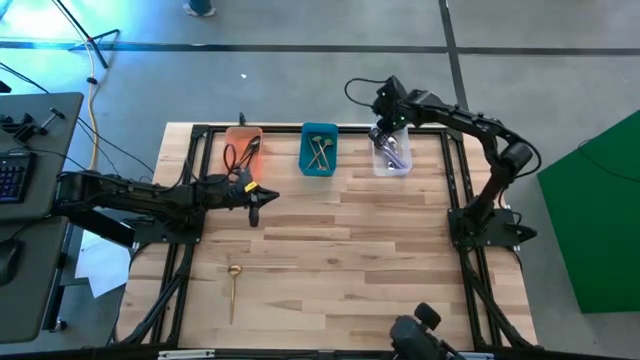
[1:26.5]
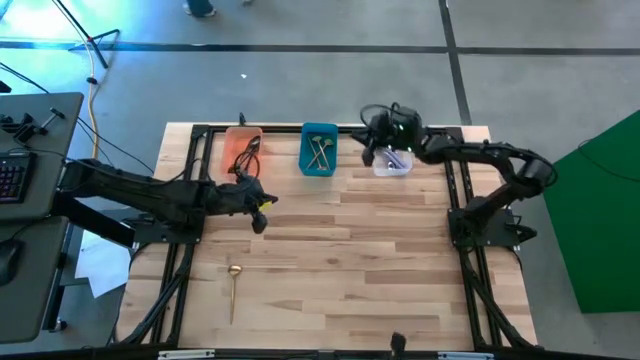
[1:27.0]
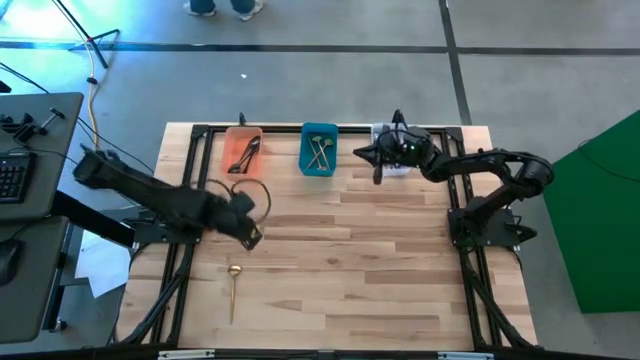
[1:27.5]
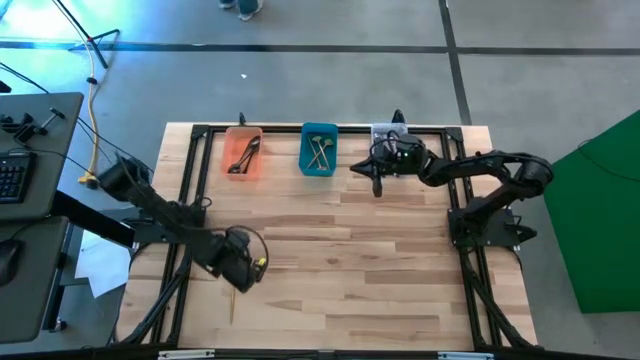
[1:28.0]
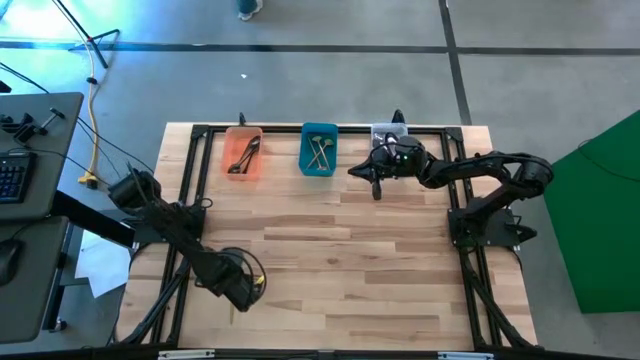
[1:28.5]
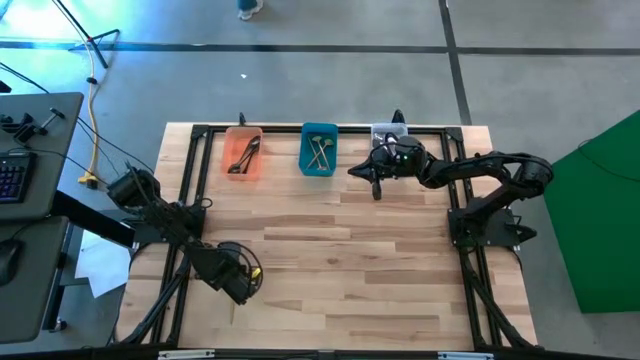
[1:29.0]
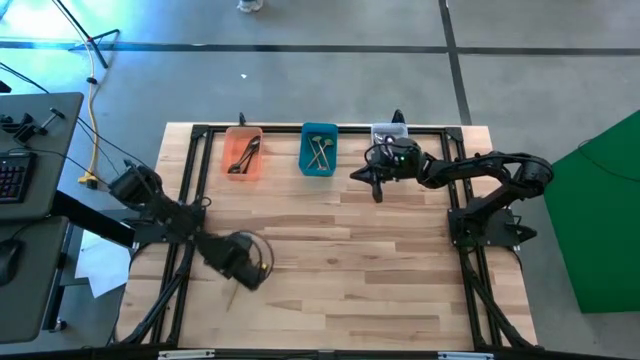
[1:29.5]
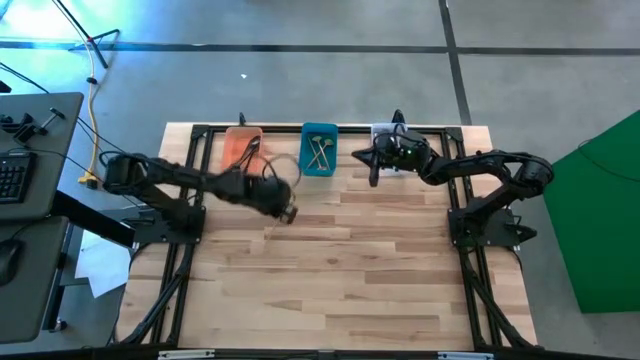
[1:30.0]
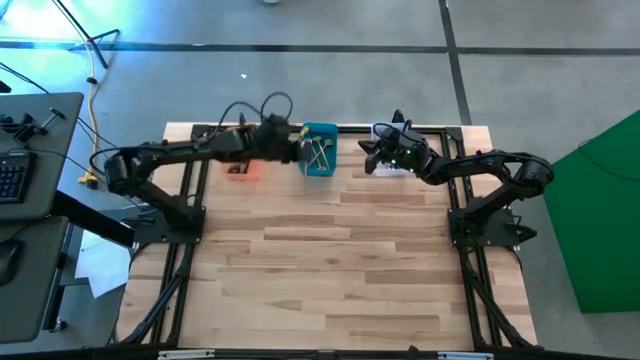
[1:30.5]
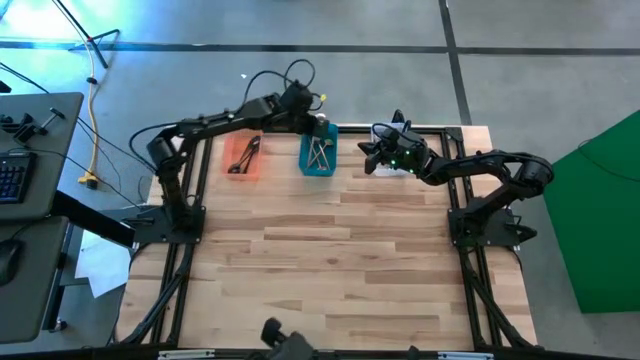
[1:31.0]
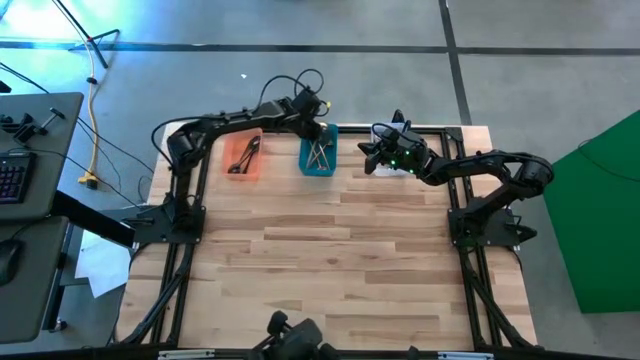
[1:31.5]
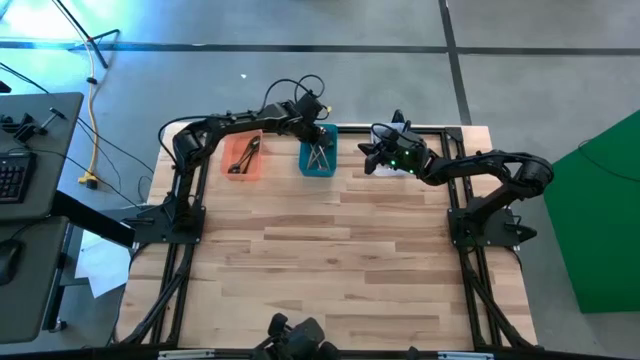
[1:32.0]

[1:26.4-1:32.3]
Task: Sort silverware by color (type)
Put the gold spoon into the blue bin

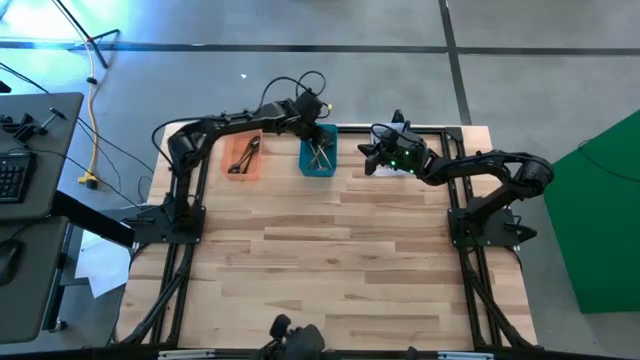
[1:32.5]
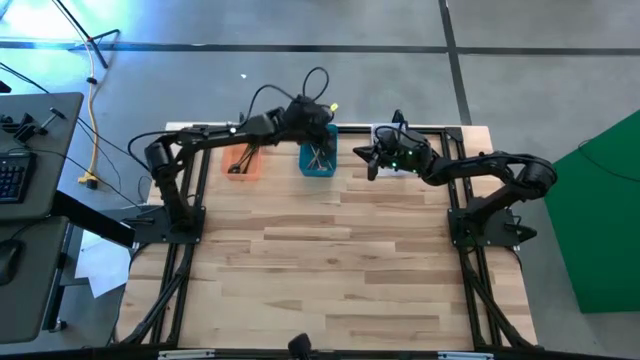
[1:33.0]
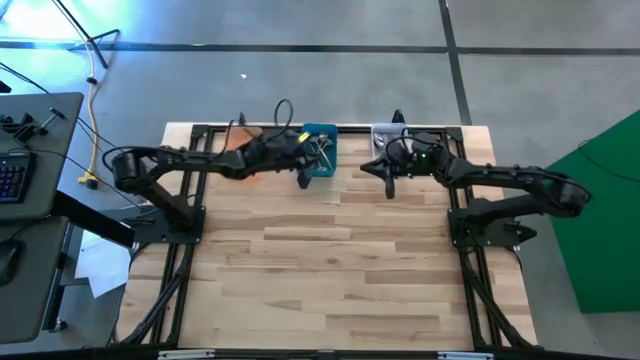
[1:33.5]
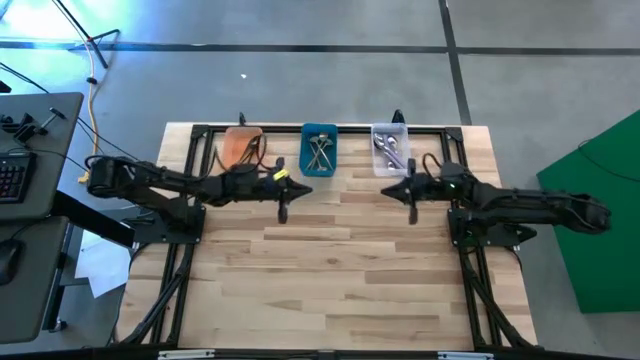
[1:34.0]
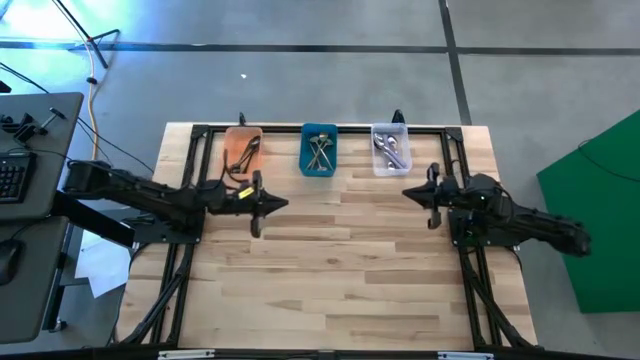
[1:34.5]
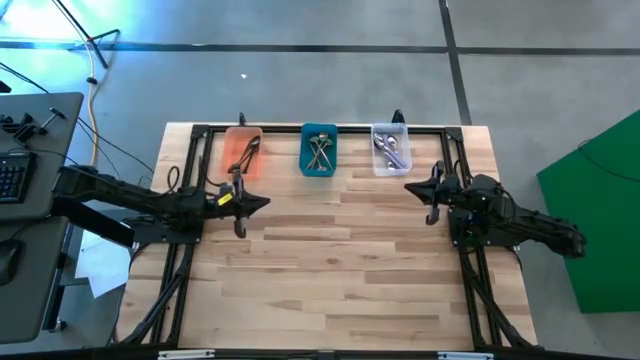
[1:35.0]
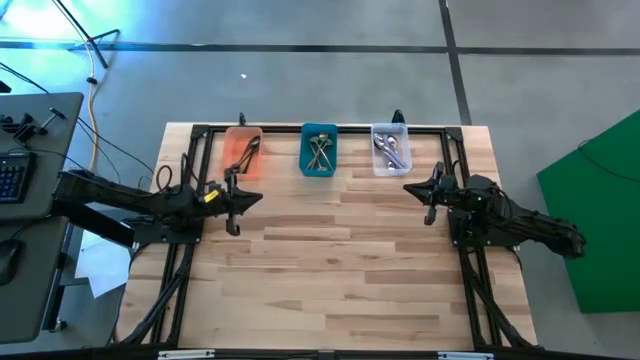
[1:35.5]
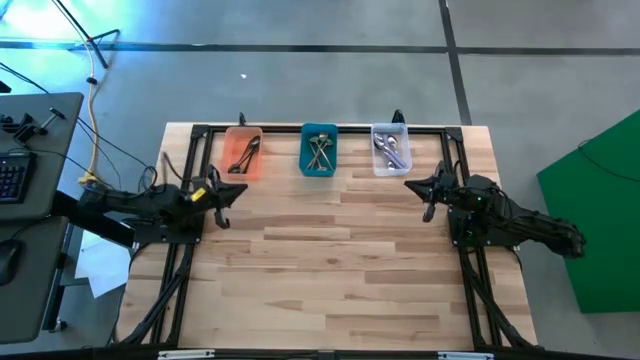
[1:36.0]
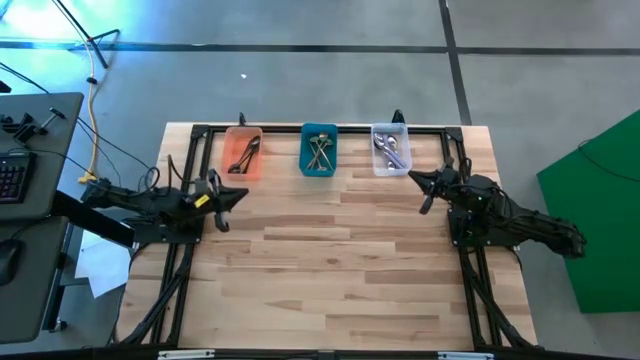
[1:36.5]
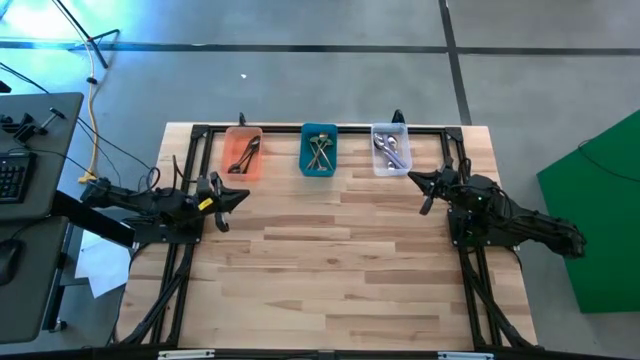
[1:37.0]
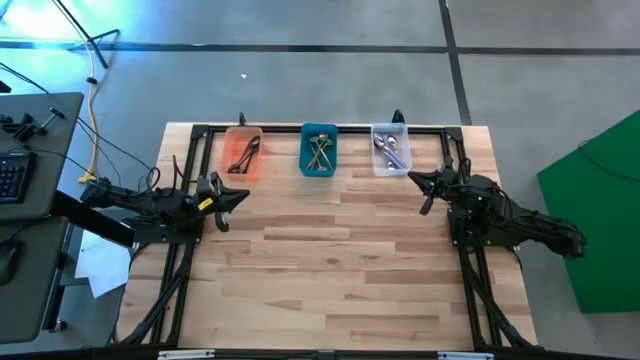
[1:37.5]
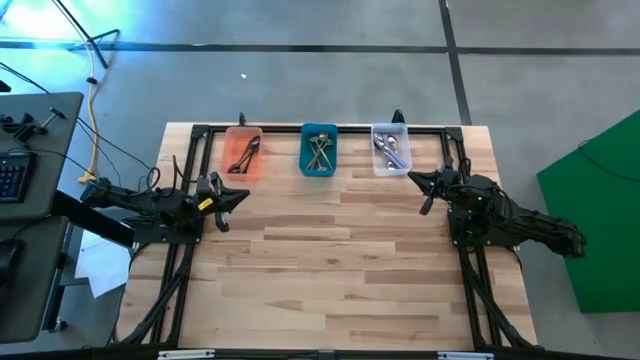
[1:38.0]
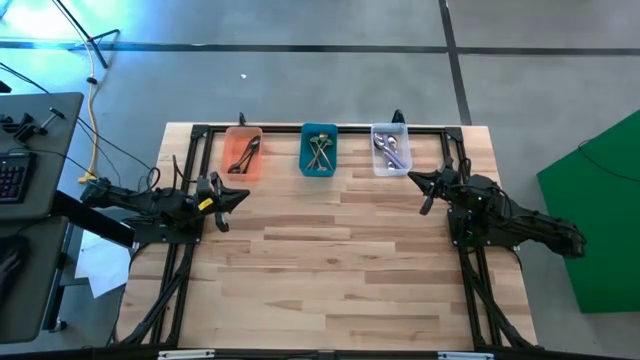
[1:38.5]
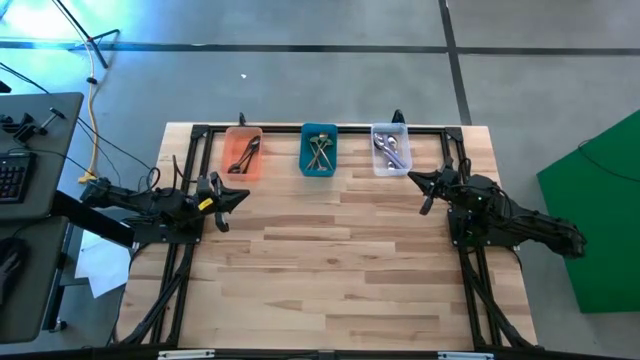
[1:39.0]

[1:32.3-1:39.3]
Return to Home Position

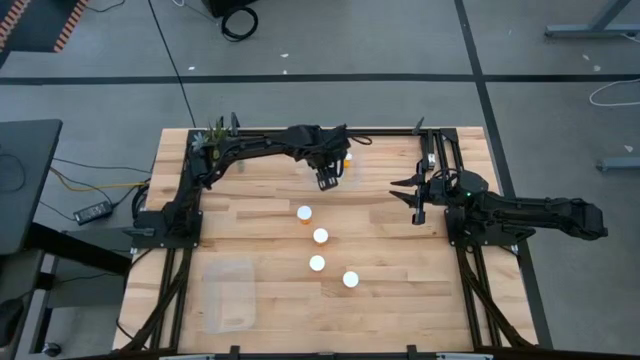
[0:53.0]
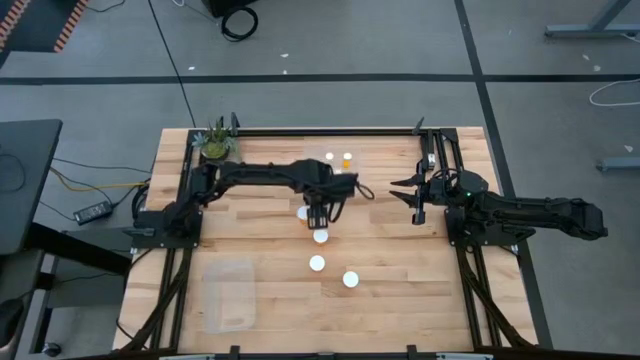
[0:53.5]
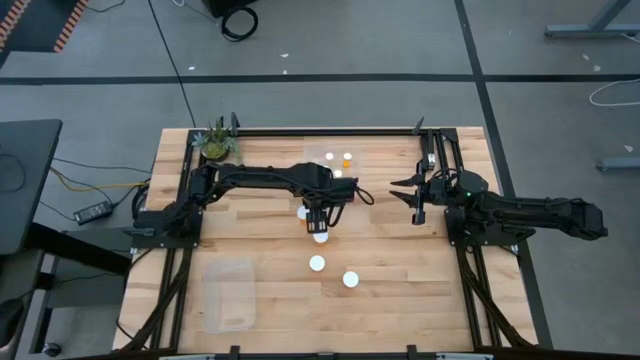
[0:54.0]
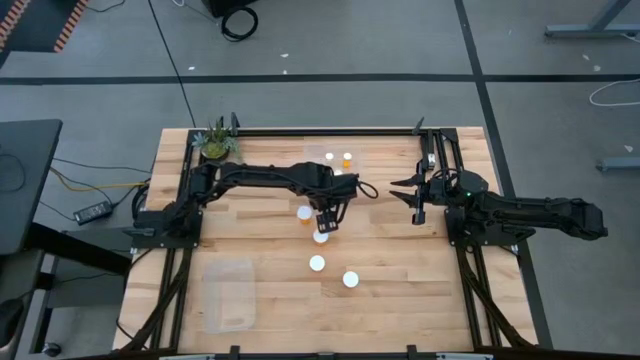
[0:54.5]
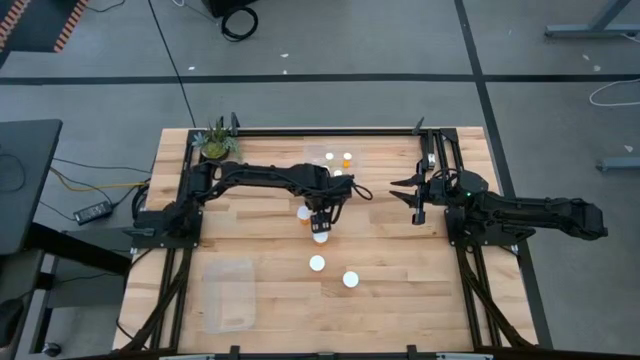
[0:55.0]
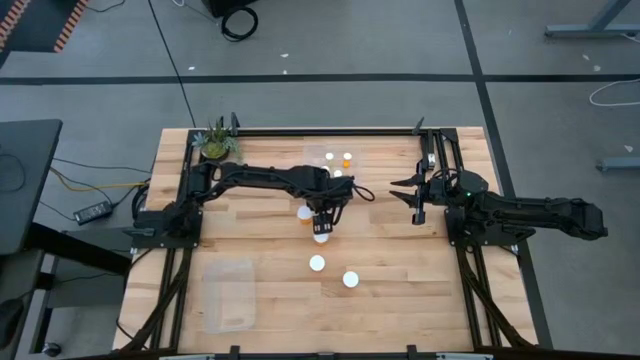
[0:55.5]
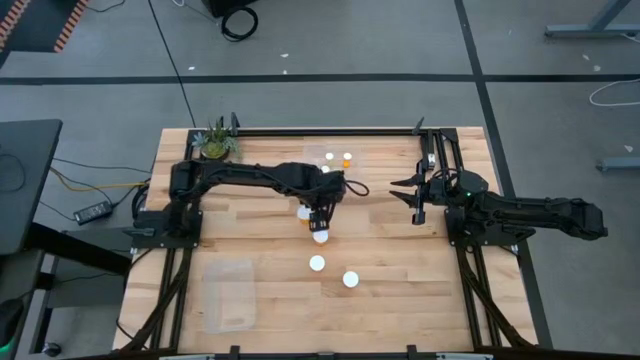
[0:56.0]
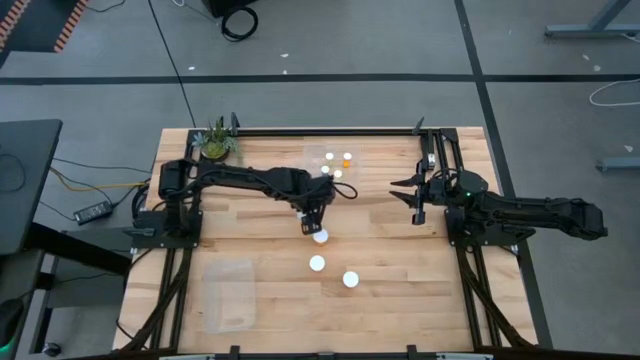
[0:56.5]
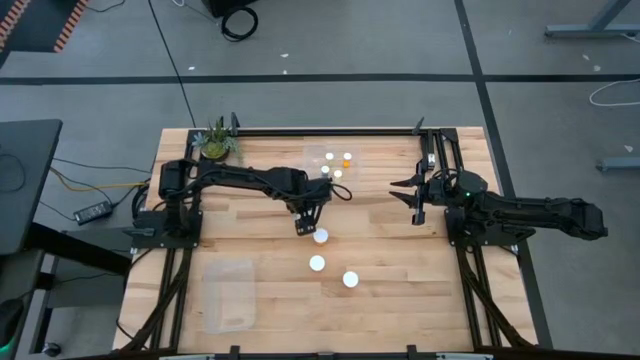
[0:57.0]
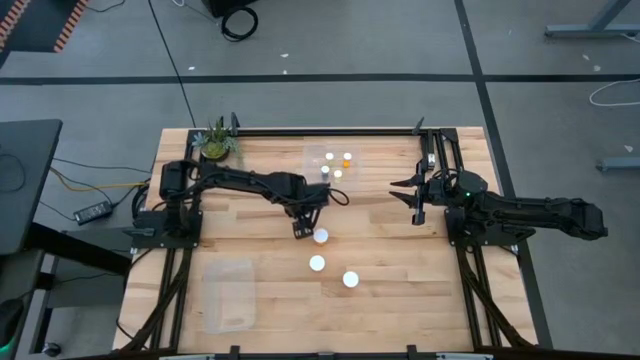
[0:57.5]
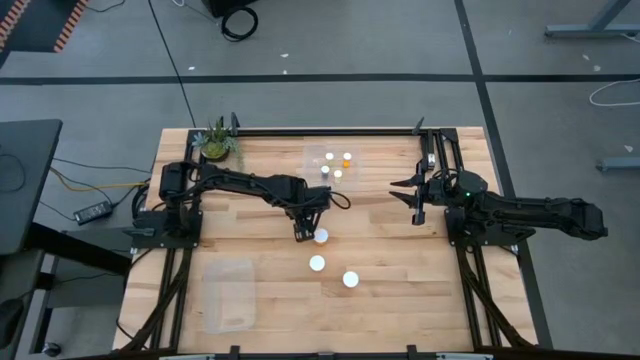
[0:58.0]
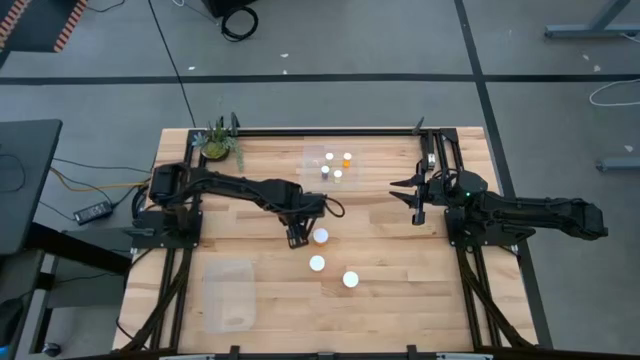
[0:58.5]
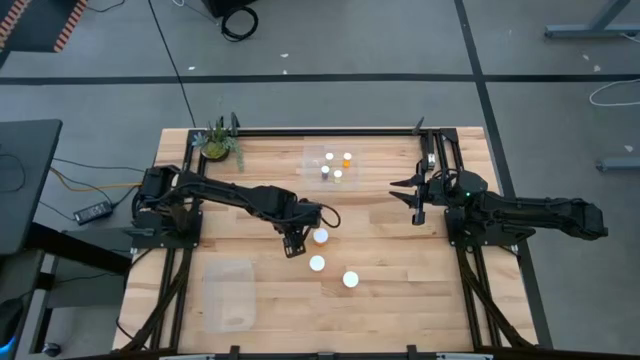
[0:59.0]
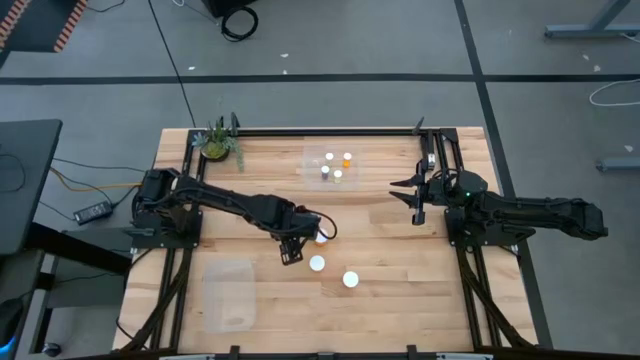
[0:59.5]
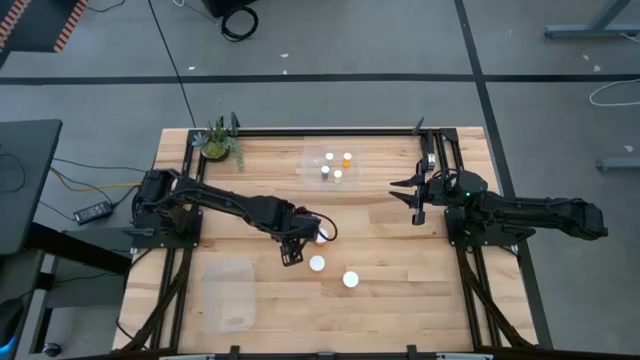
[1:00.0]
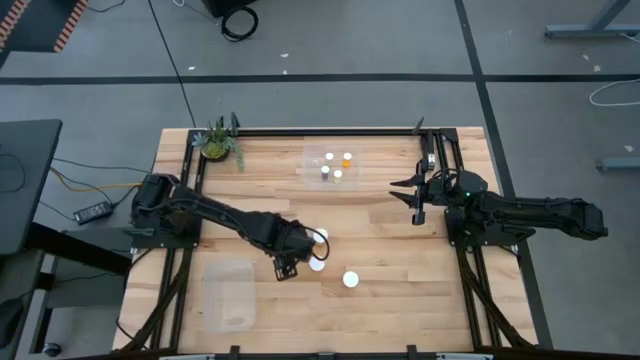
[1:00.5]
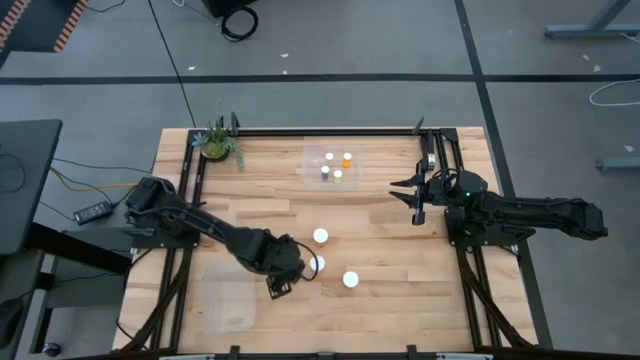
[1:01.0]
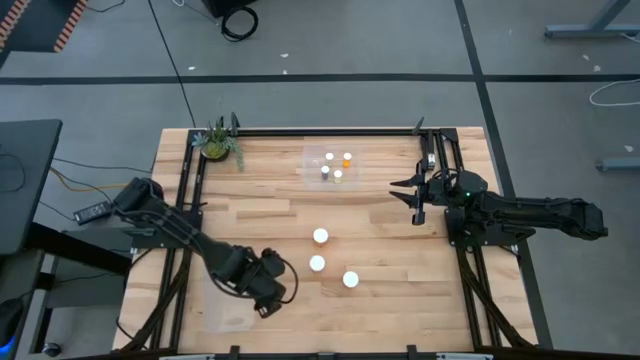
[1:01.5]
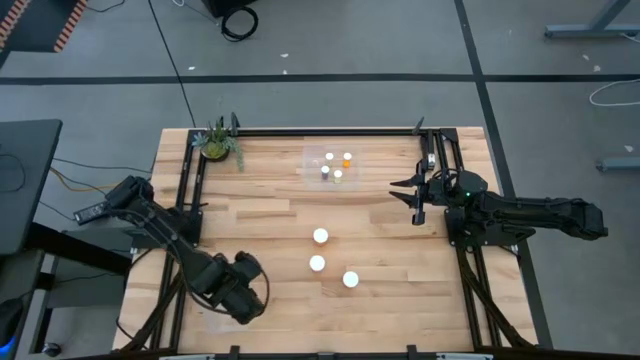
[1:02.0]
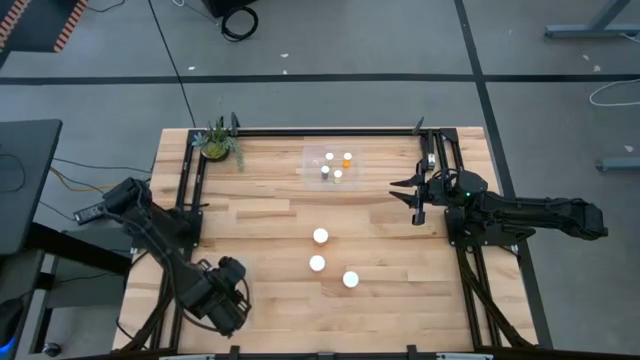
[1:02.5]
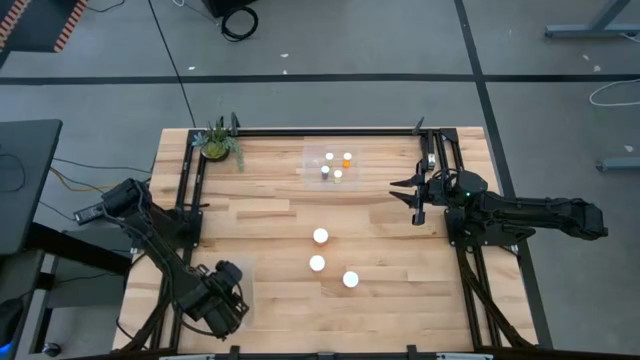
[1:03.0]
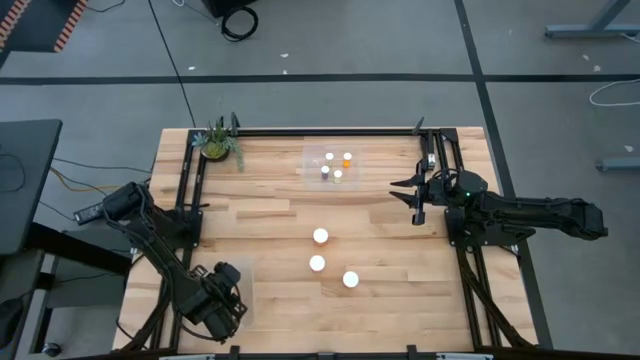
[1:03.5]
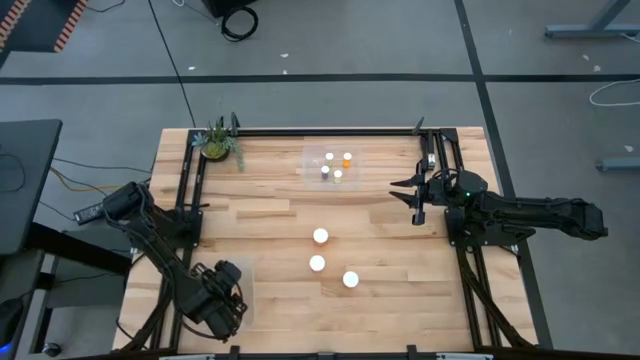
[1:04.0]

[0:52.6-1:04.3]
Task: Pick and place medicine bottles into bin by pill shape (circle, oval)
Put the orange capsule bottle into the bottom transparent bin
